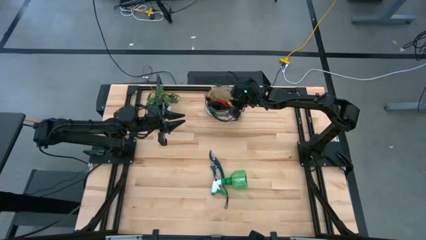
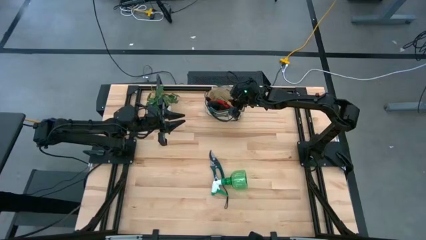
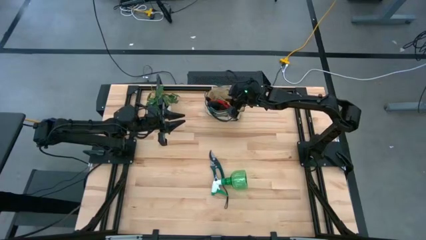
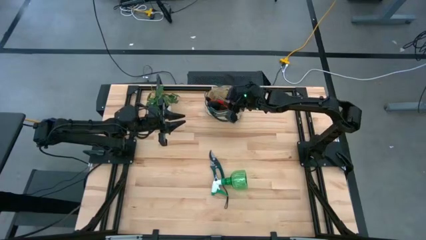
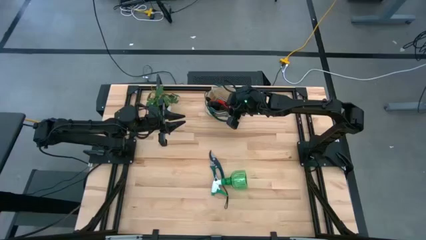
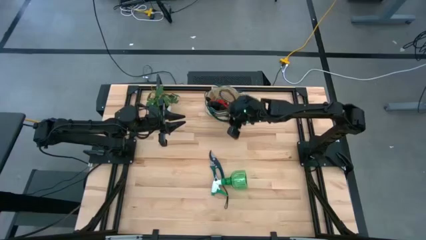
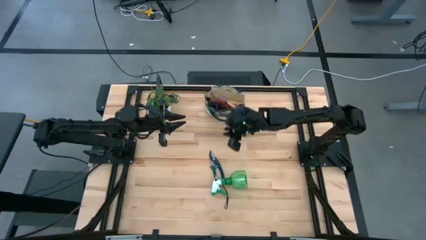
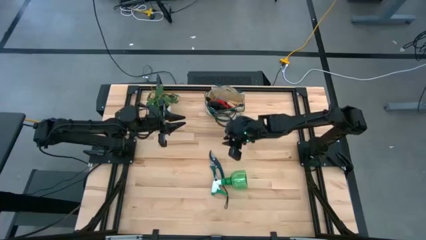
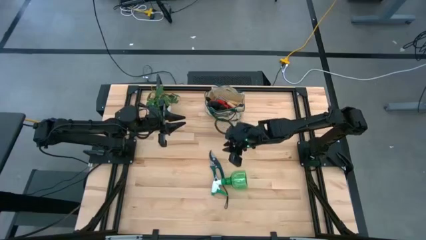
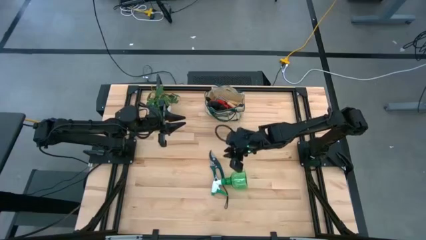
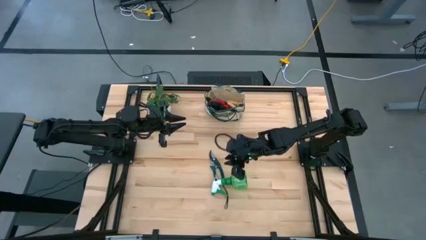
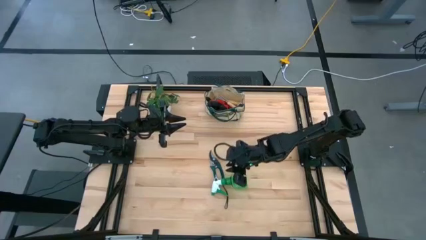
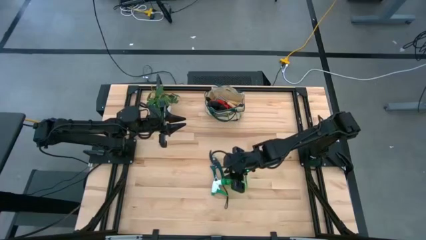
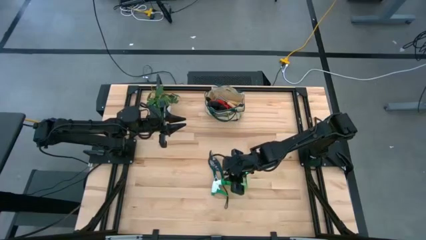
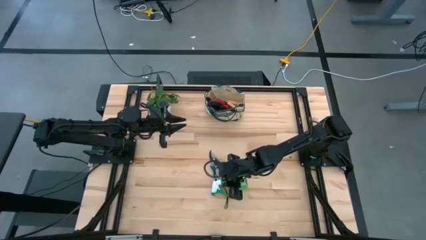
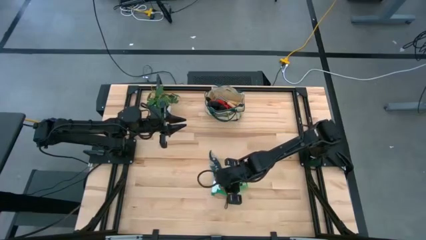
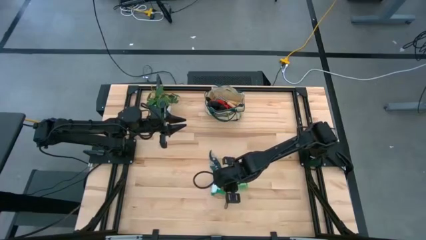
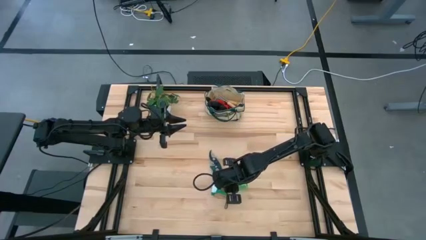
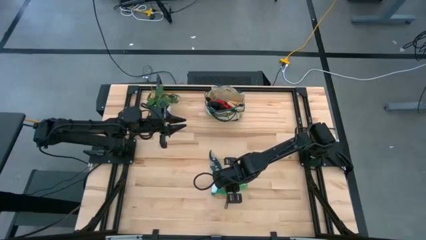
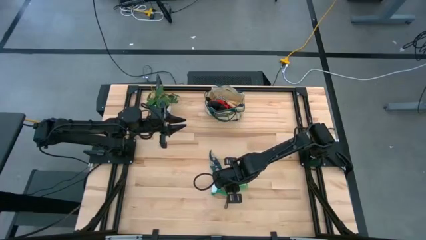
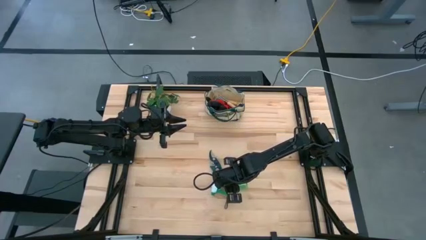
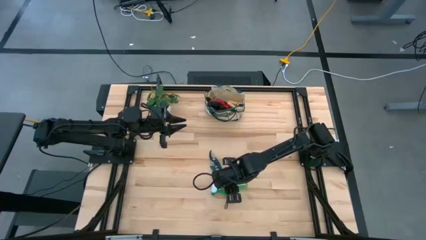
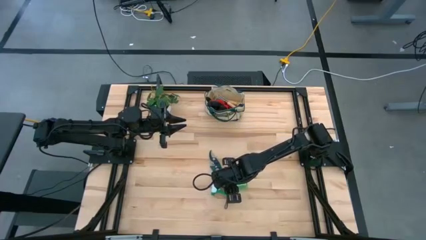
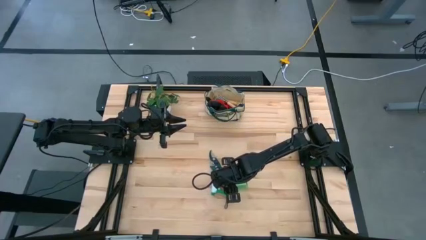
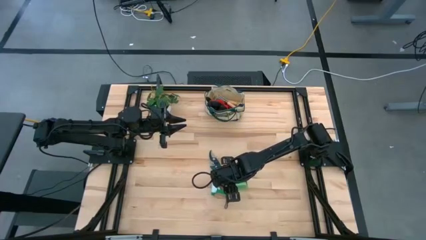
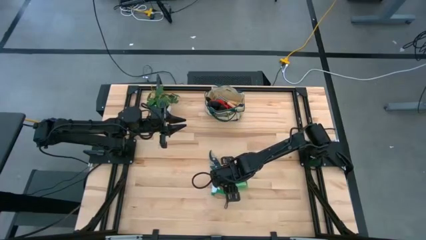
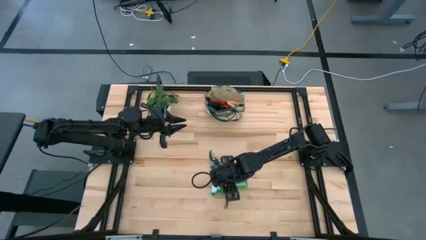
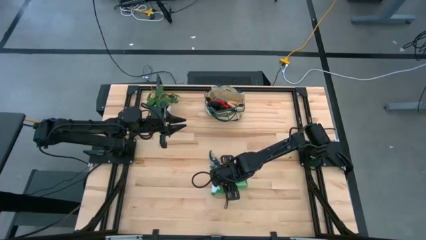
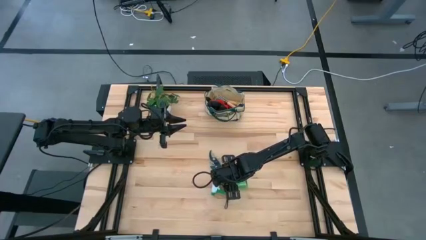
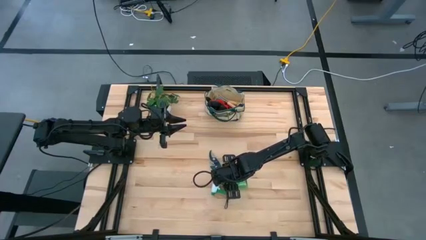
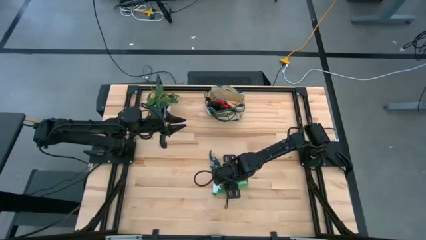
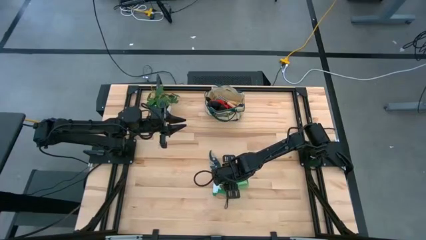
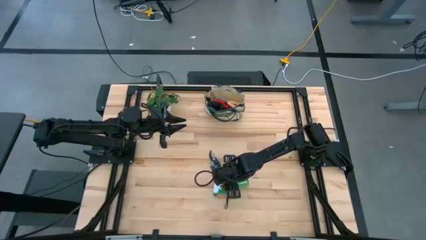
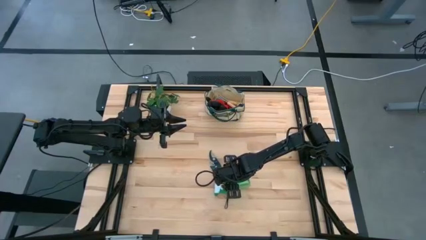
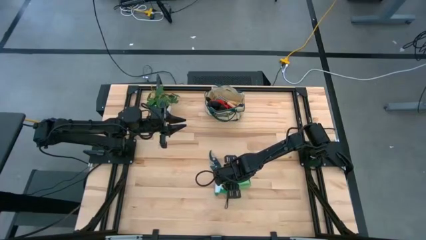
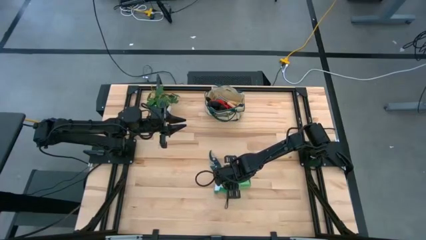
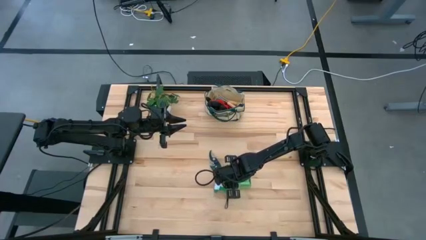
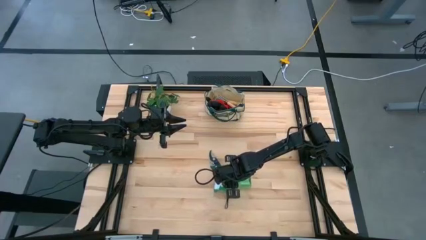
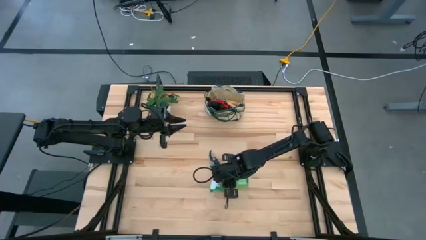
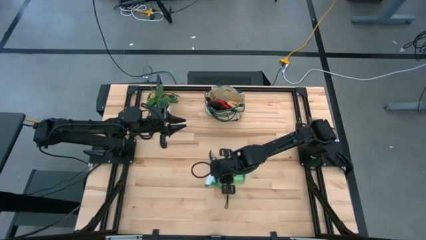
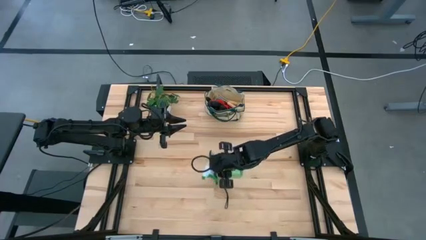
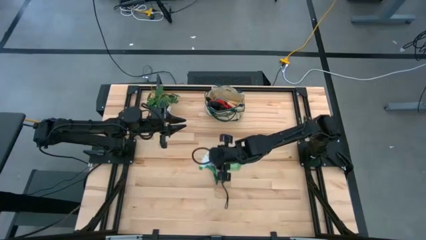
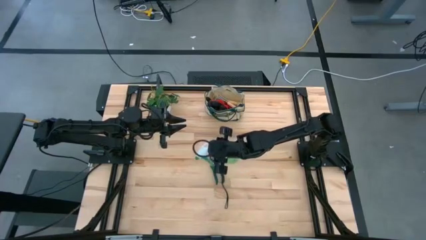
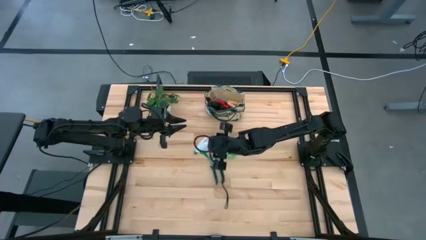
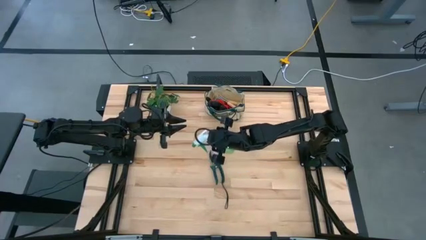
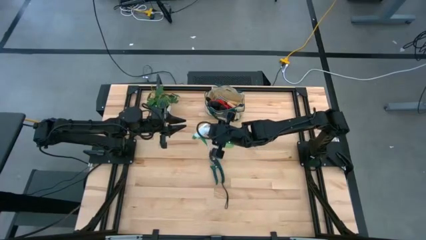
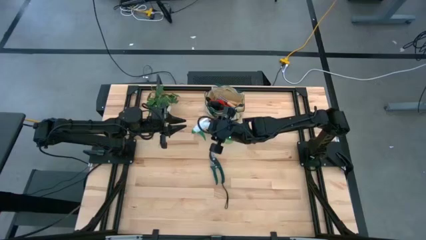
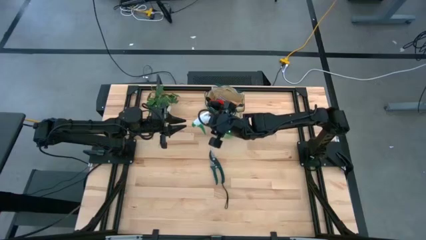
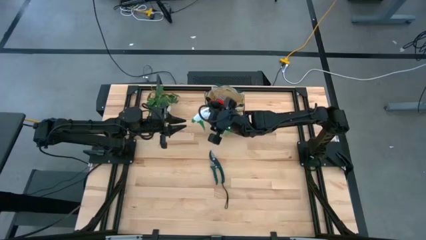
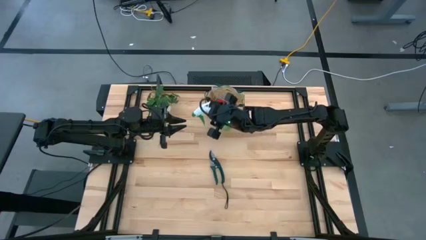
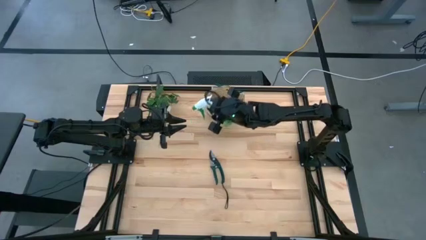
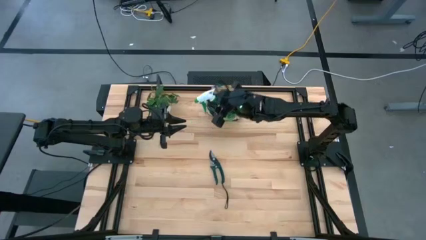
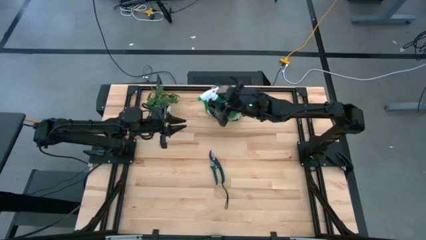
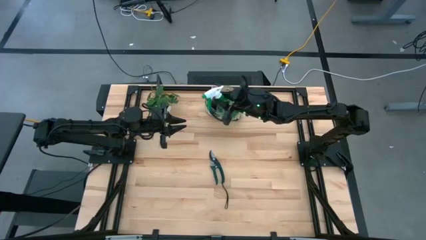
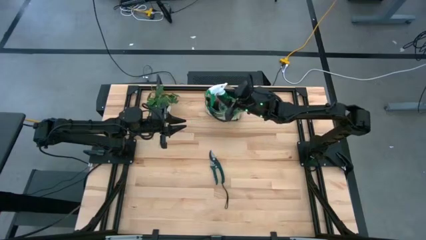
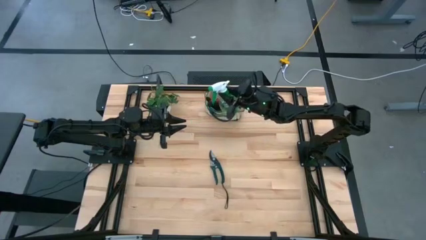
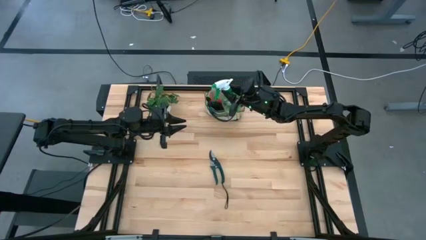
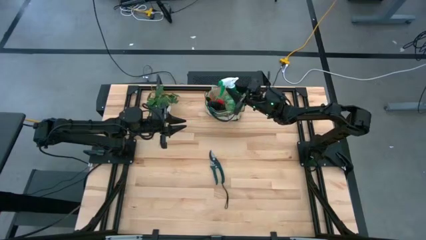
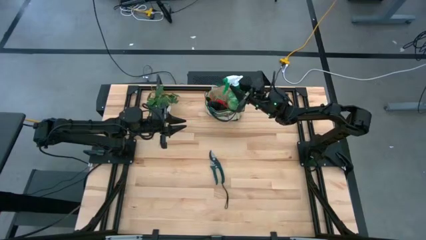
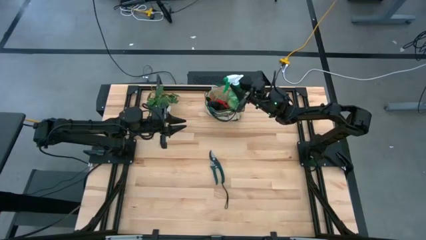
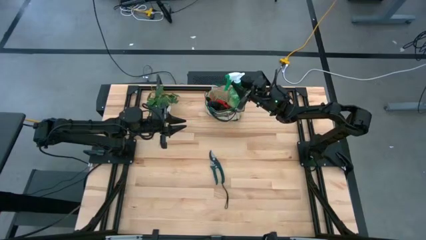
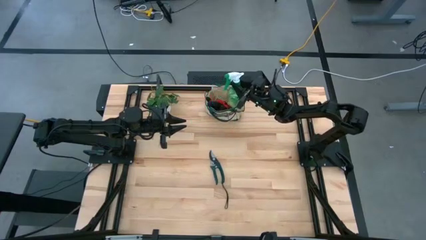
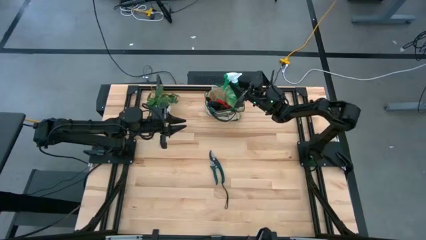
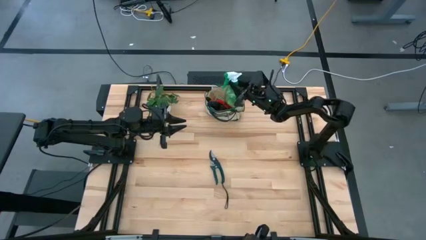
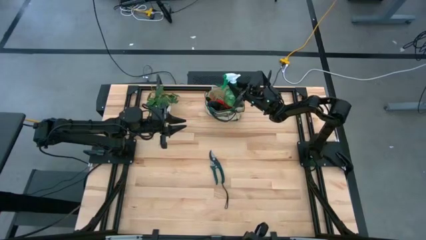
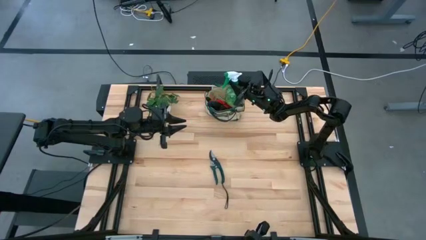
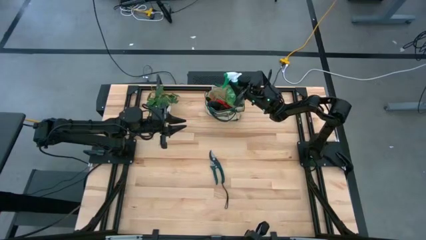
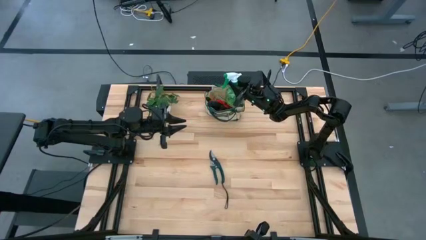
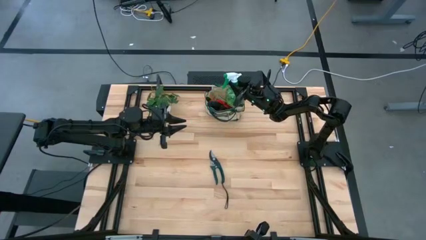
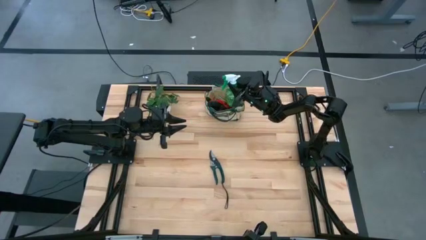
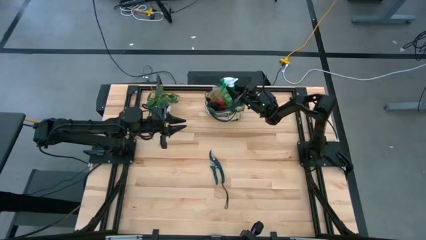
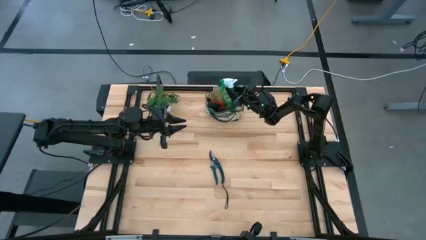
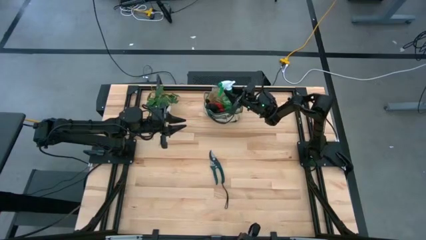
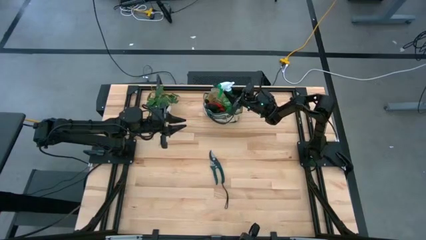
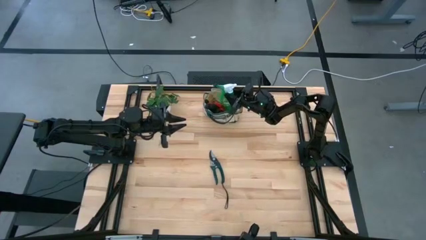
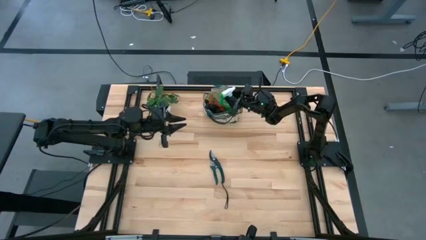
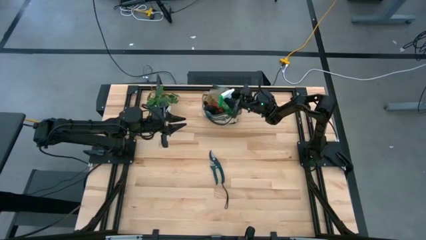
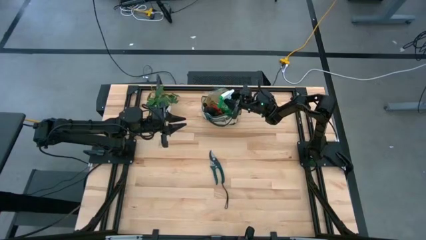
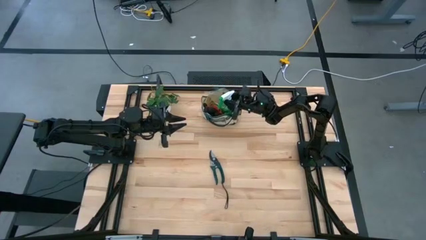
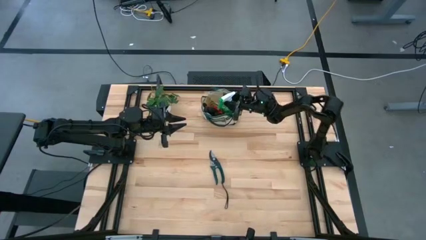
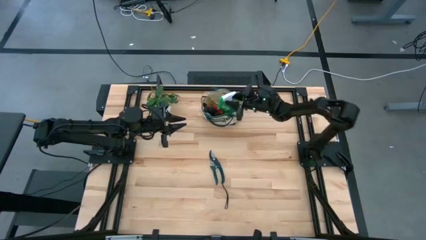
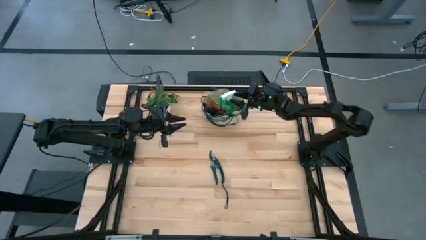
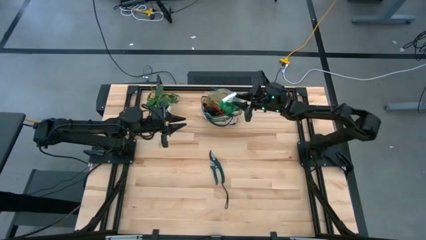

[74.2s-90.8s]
Task: Pick & Place Garden tools in Gardening bag
Put the green spray bottle into the gardening bag

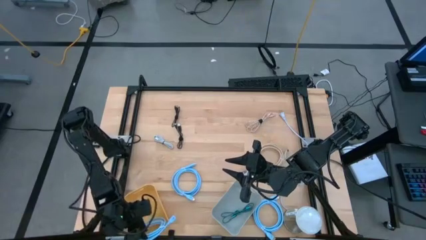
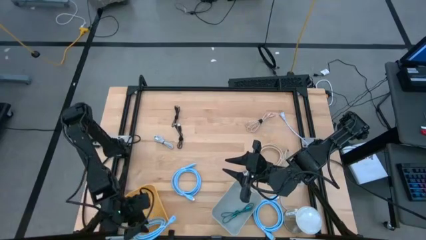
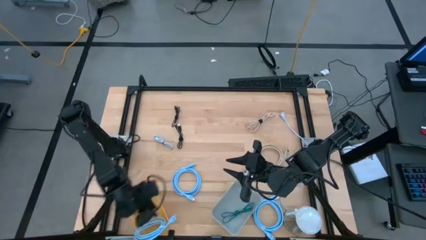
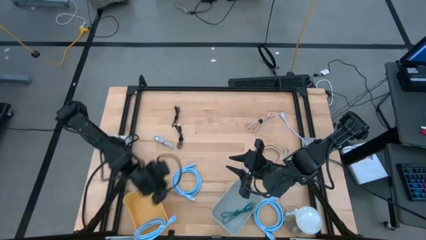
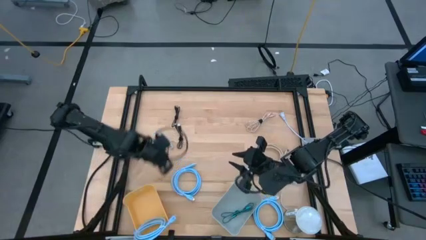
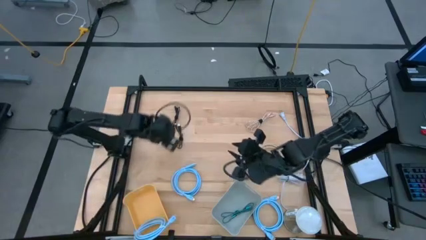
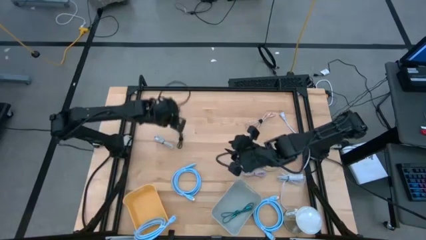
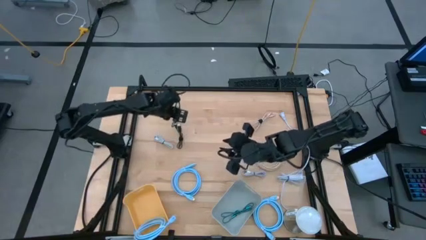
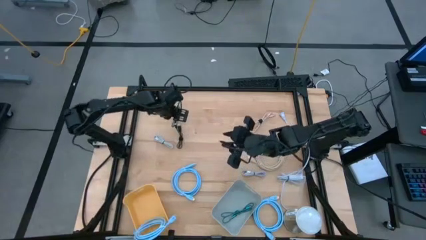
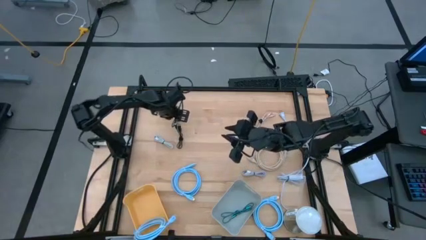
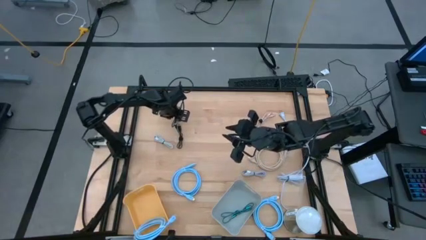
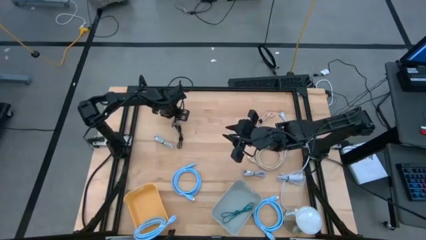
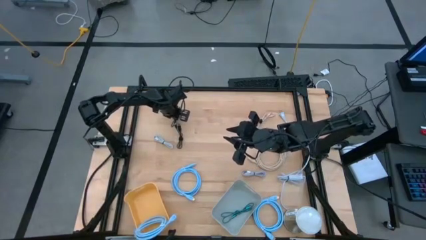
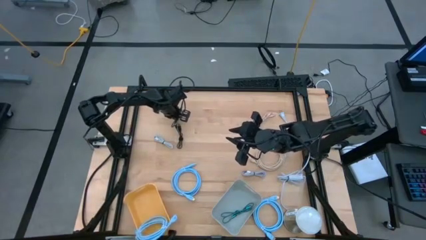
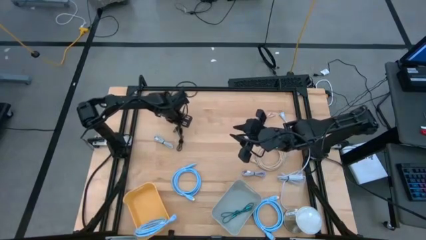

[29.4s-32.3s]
Task: Sort cables
Put the top black charger cable into the gray bin
